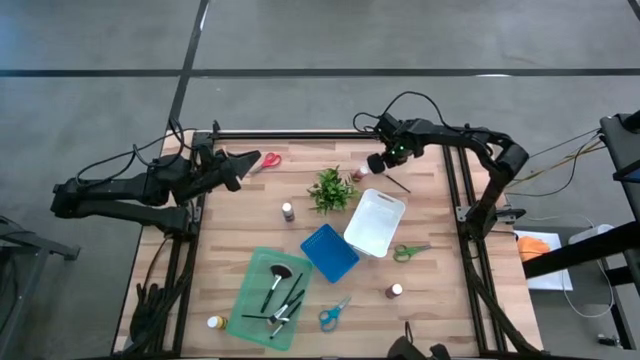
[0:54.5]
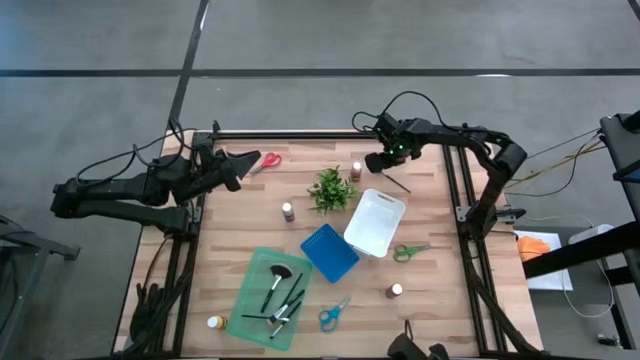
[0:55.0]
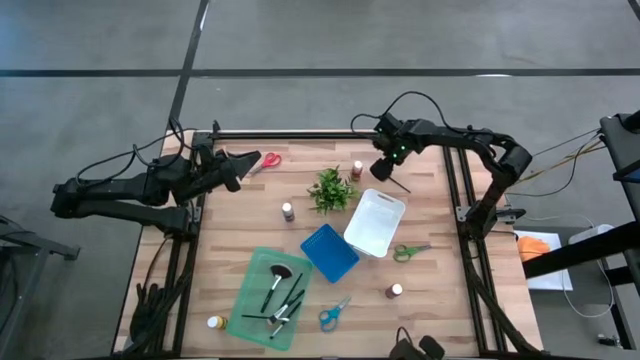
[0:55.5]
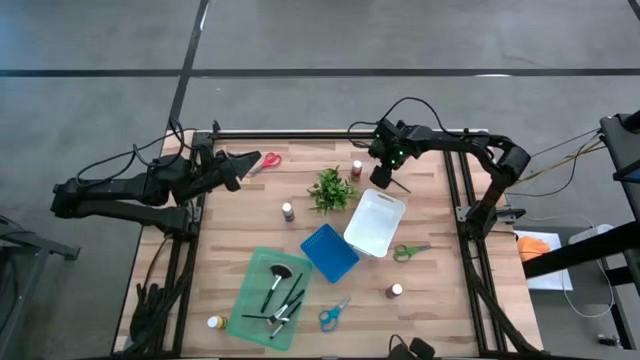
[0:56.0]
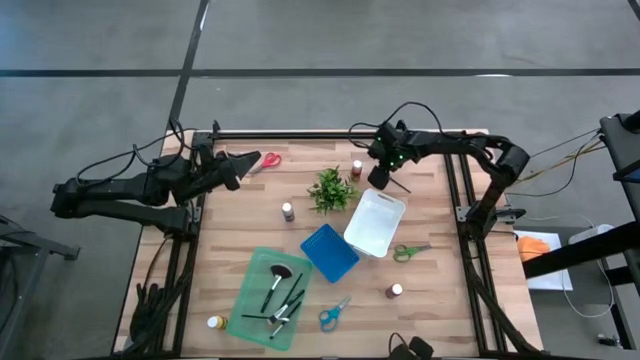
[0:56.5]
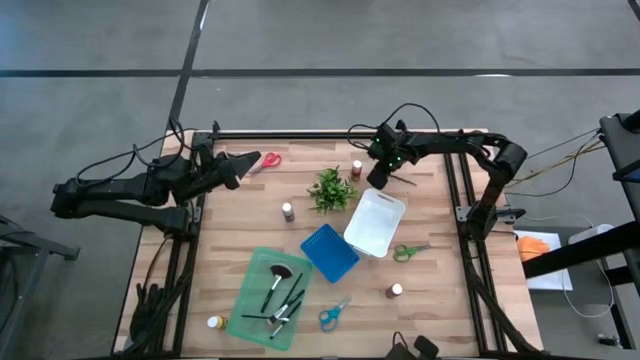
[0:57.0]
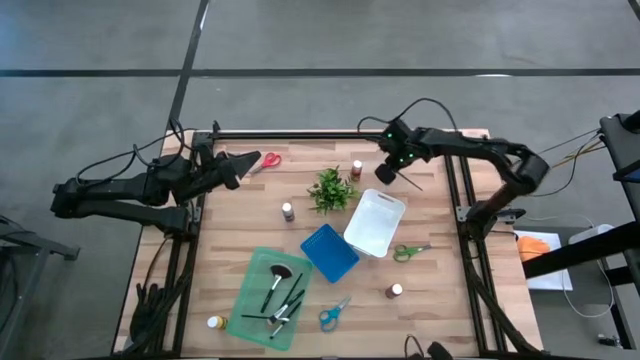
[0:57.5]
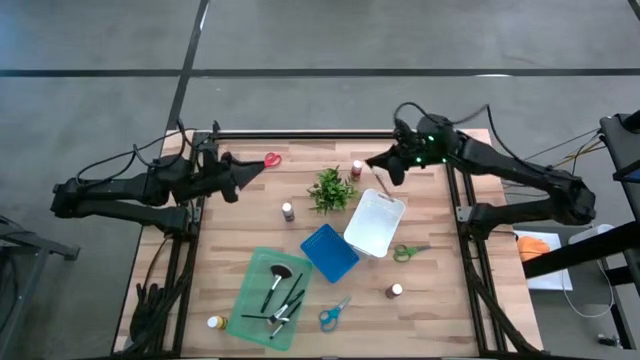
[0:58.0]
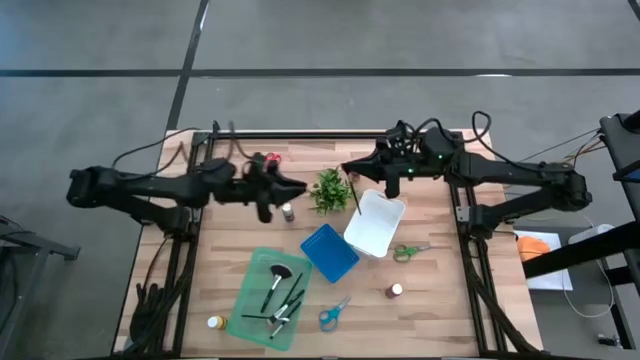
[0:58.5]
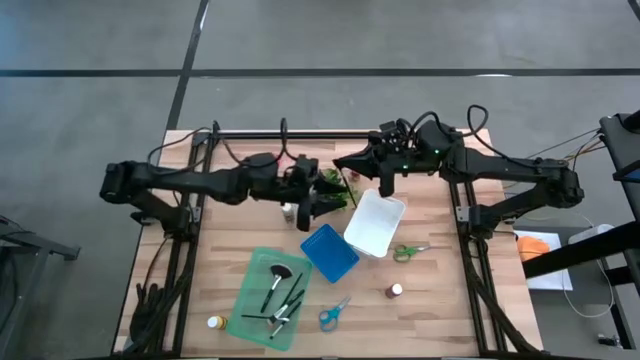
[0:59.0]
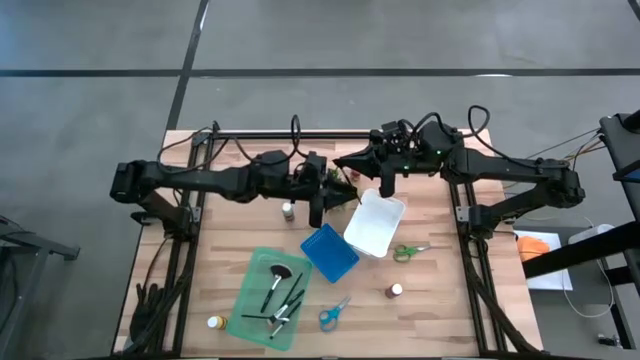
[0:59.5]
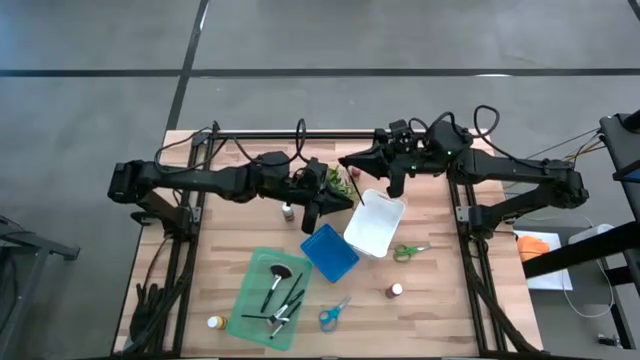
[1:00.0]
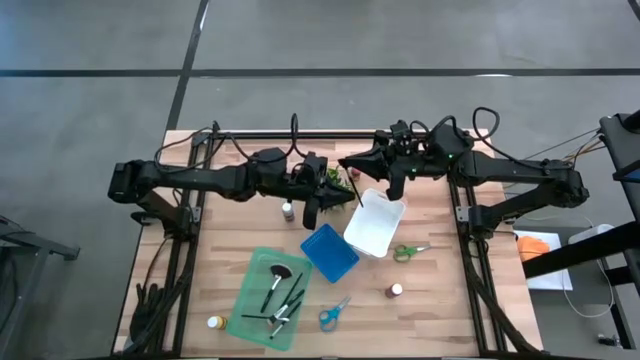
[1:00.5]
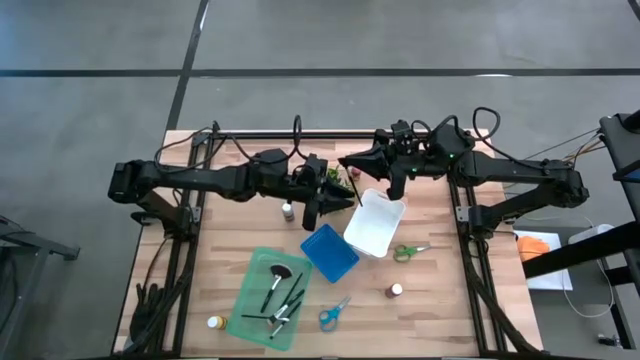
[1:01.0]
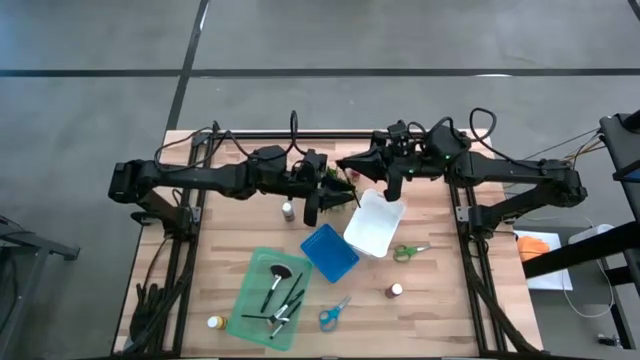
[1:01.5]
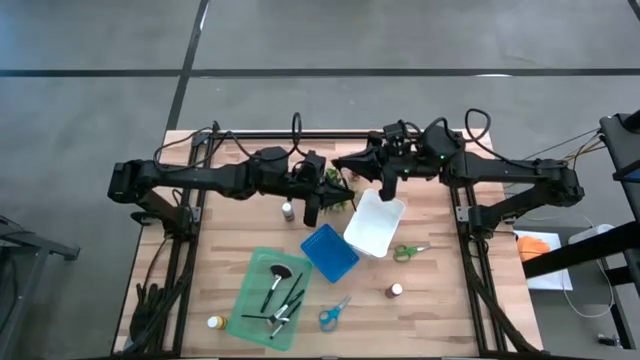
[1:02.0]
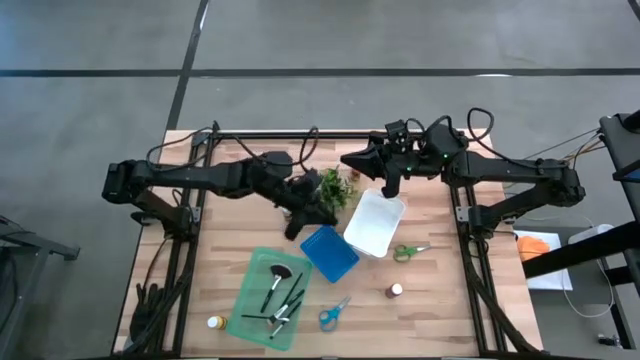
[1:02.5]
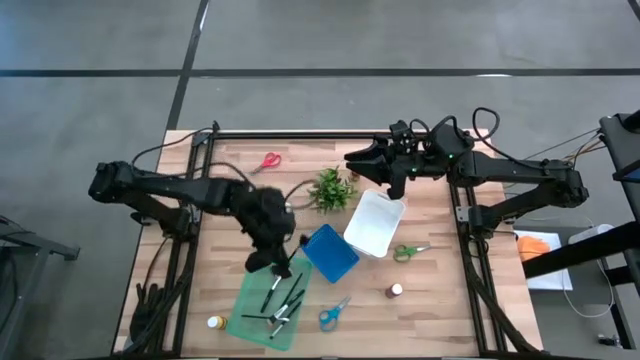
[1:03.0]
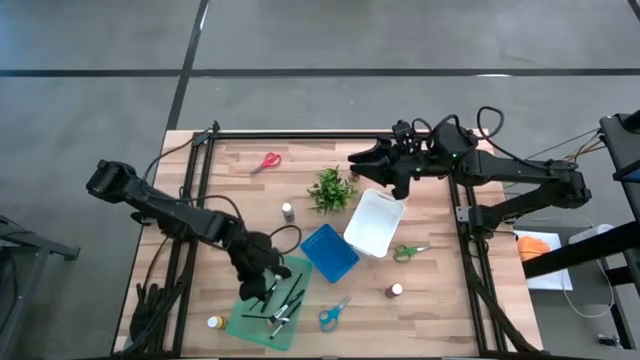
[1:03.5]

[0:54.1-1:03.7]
Task: Pick & Place Paint Supplies
Put the black eye groomer brush into the green bin

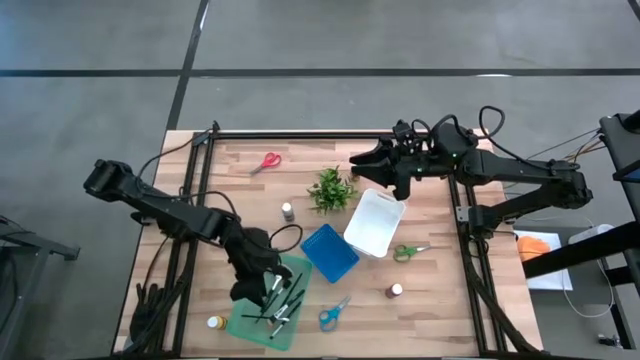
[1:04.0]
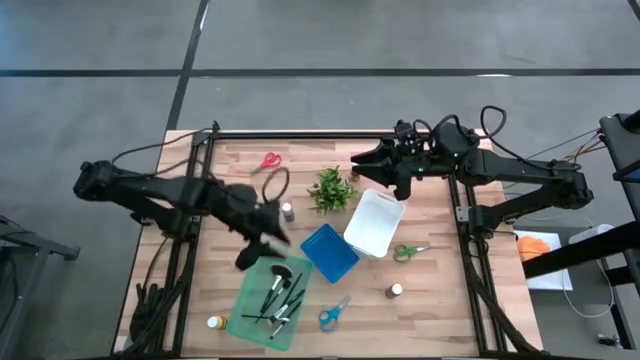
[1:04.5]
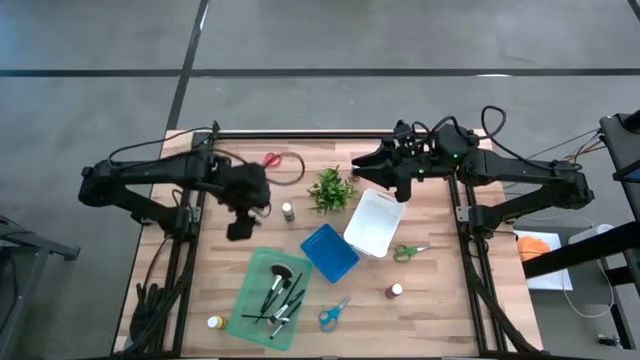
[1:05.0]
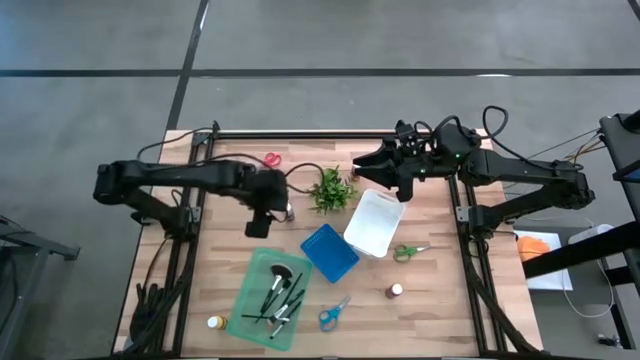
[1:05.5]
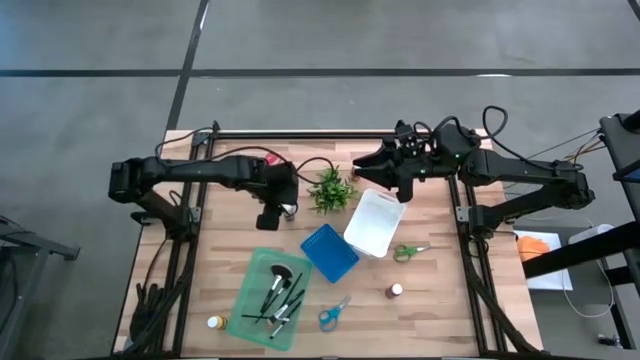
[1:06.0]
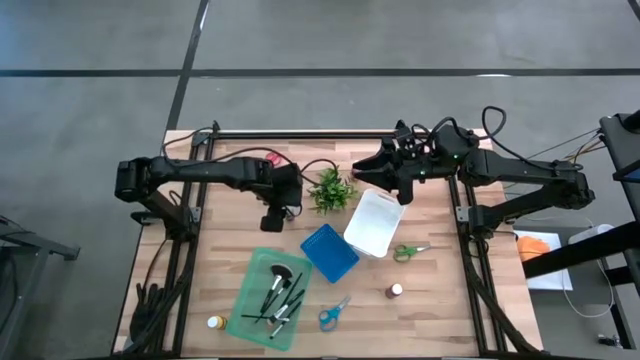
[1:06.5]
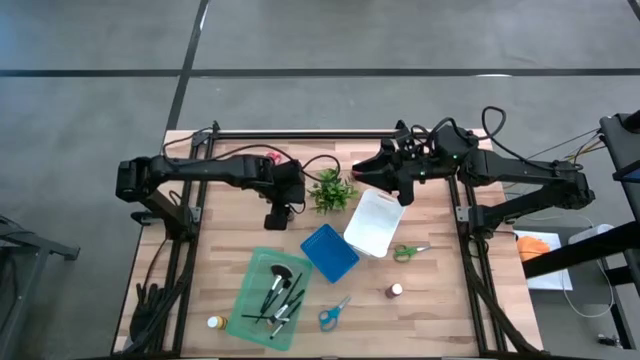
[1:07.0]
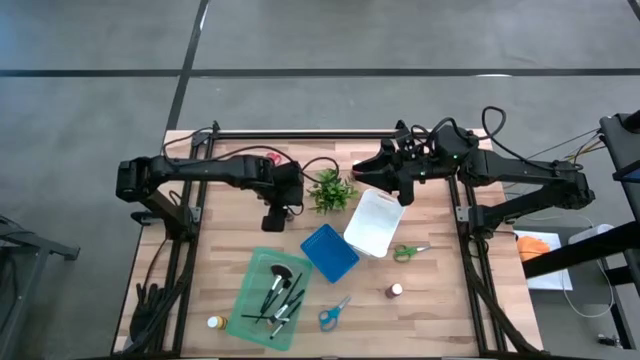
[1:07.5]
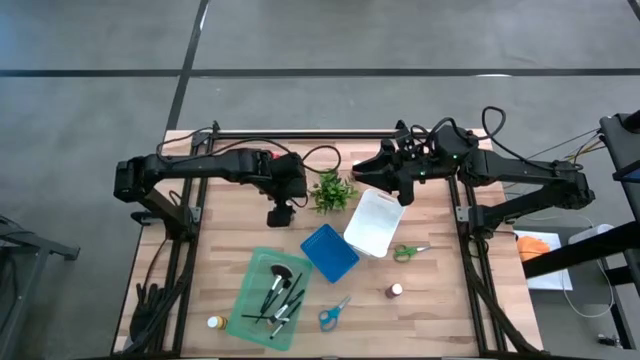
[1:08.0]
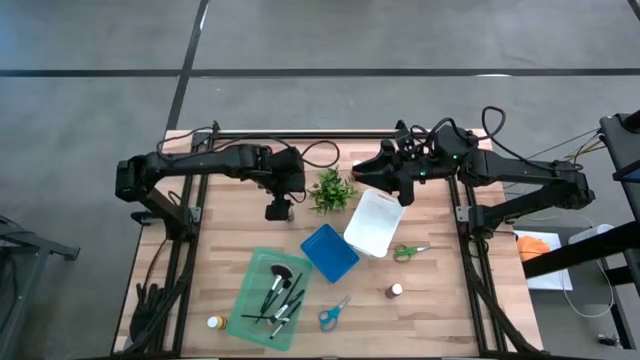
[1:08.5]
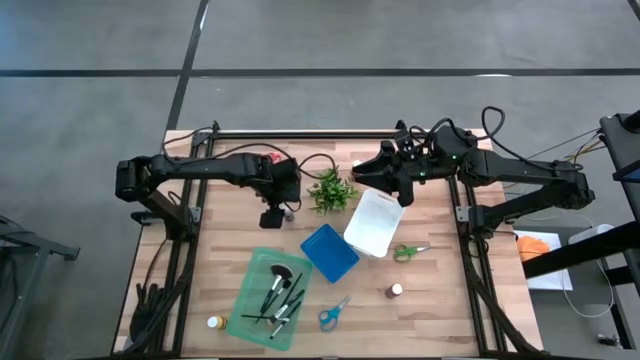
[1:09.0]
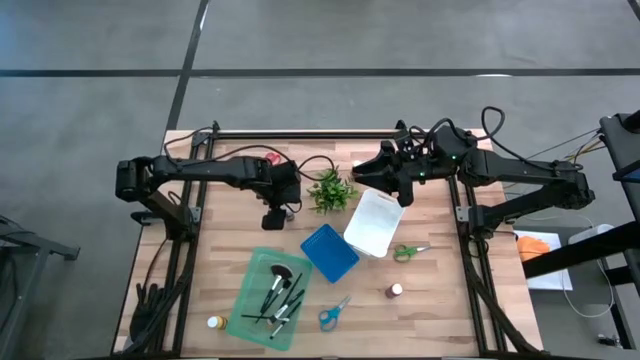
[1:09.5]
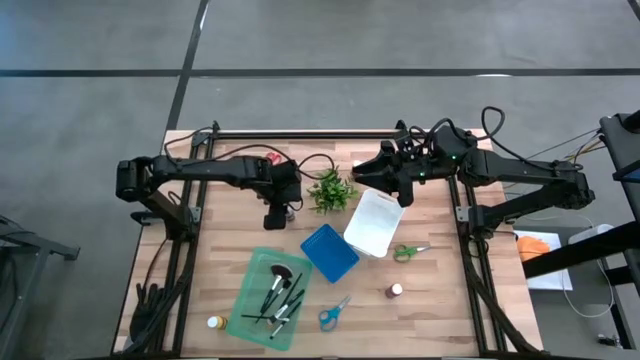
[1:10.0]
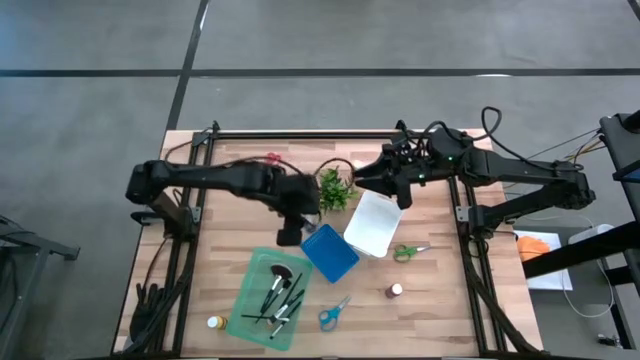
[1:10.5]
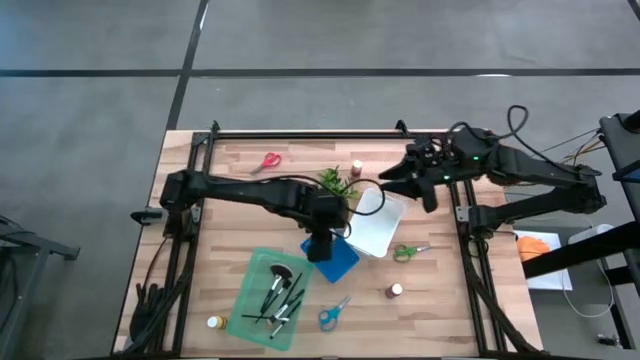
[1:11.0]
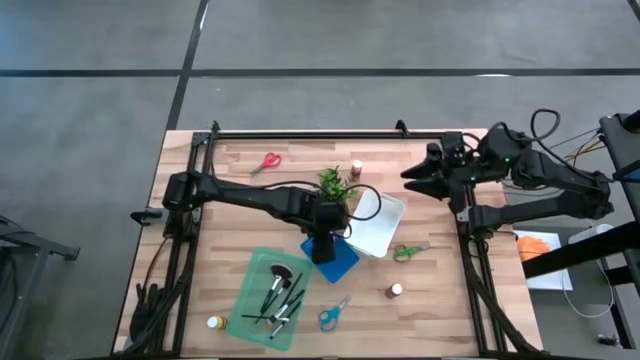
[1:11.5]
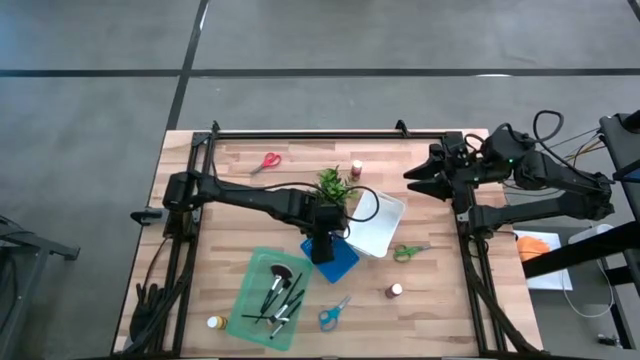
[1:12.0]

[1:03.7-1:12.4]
Put the gray paint bottle into the blue bin

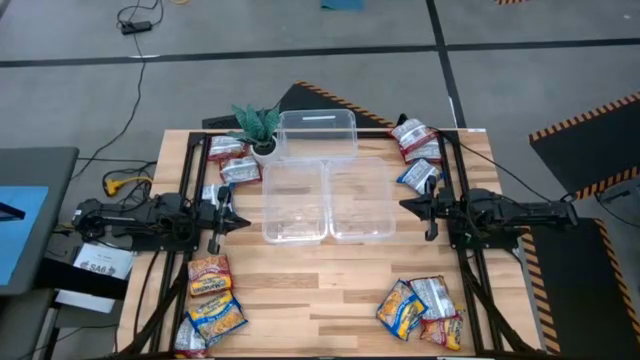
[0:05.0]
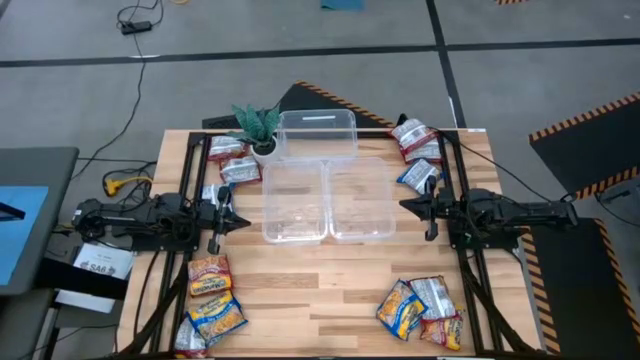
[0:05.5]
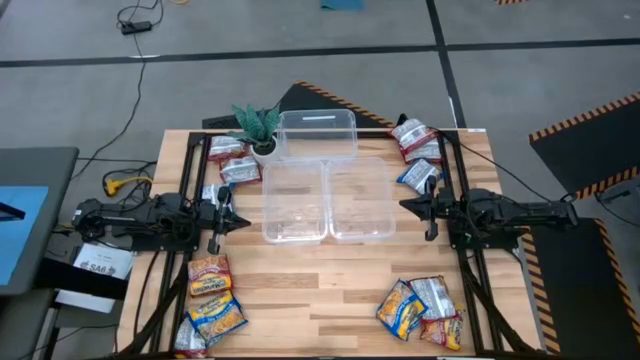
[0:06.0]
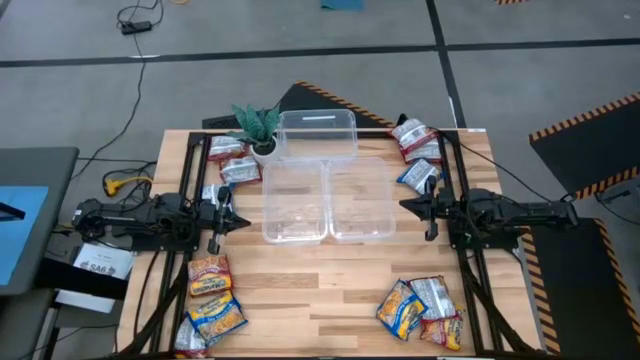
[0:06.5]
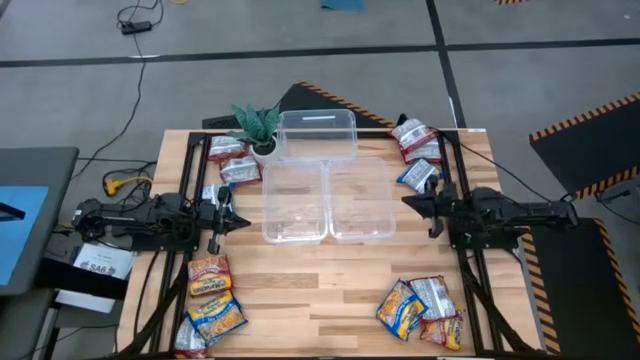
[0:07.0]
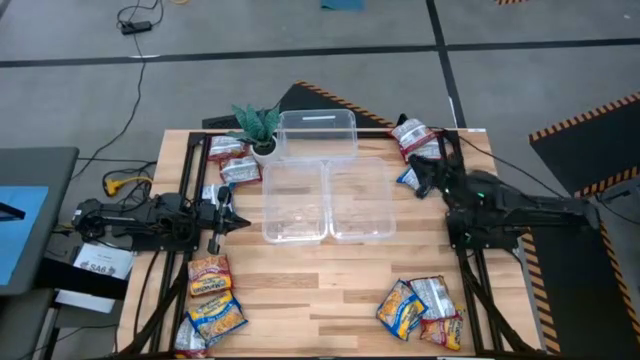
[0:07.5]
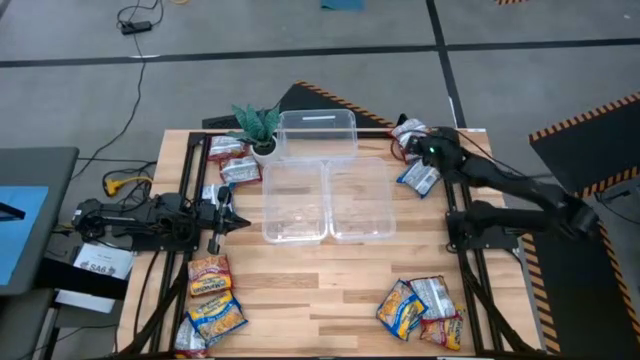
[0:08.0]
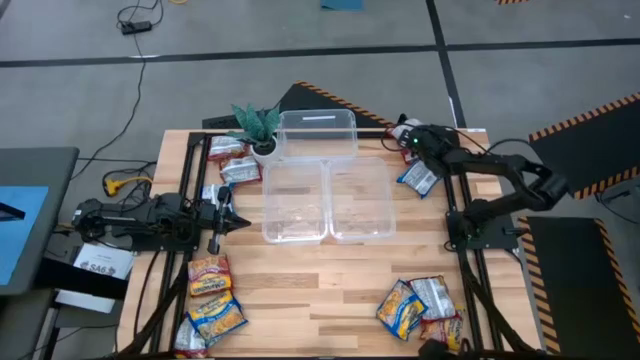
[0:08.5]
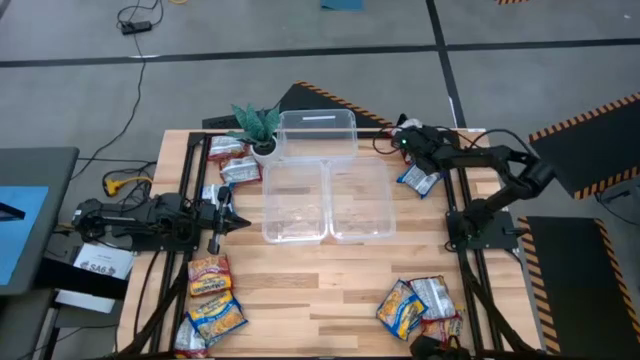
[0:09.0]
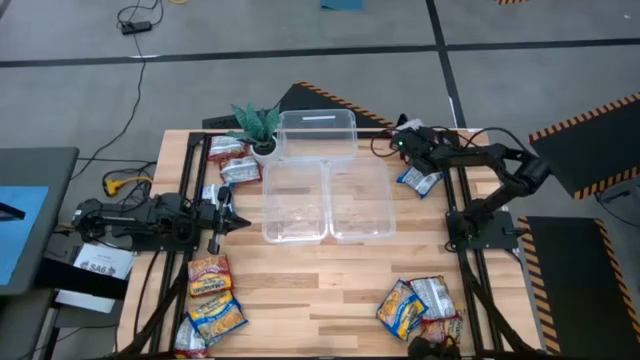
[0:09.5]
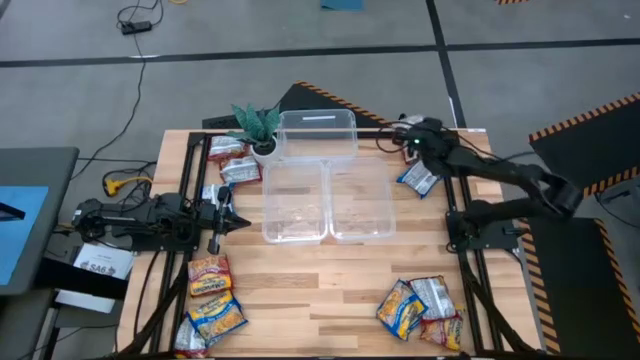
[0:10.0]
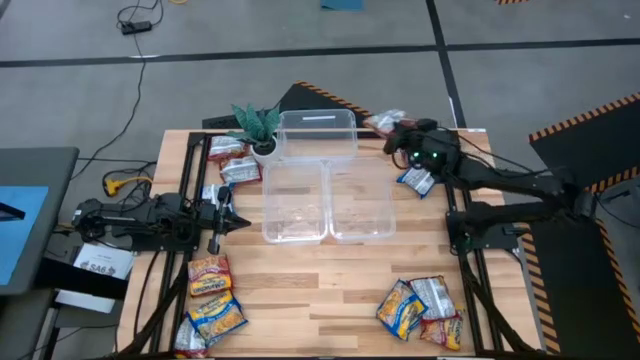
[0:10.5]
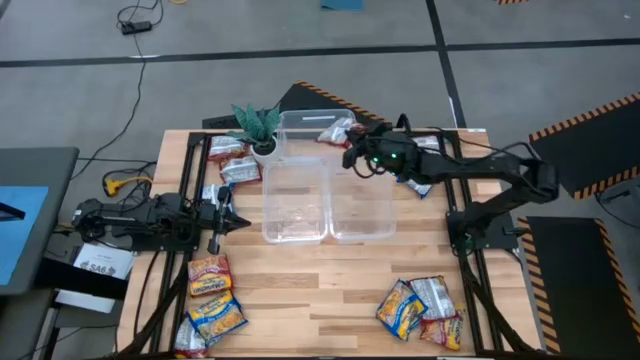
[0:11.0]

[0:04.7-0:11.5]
Task: Sort Maruchan noodles
Put the red noodle pack into the top transparent bin
